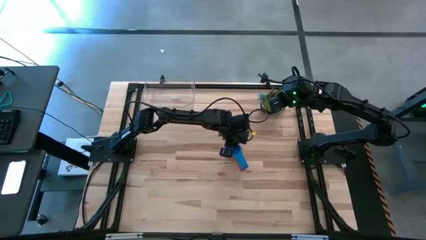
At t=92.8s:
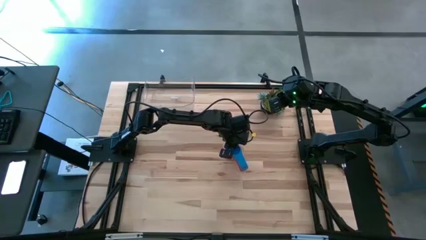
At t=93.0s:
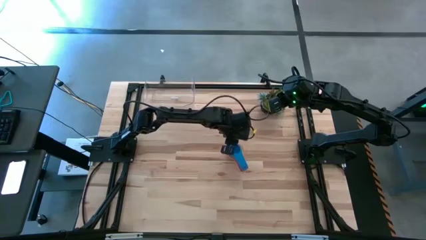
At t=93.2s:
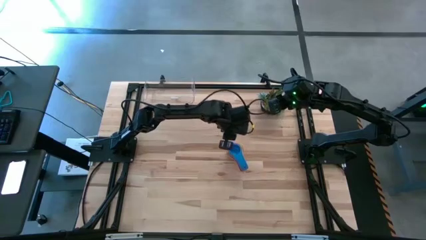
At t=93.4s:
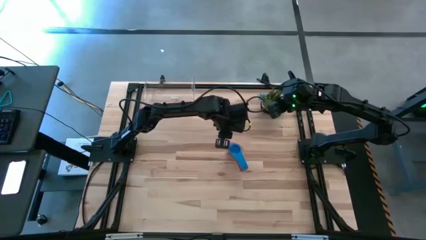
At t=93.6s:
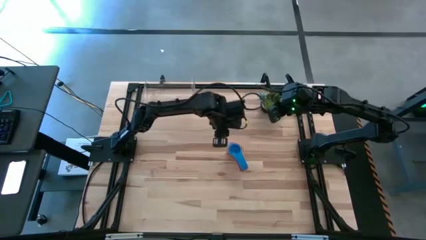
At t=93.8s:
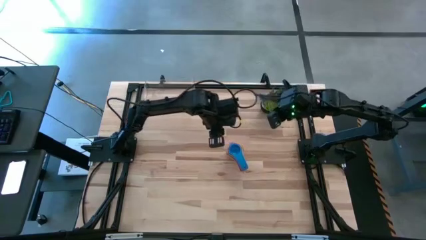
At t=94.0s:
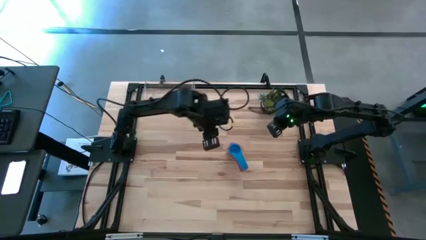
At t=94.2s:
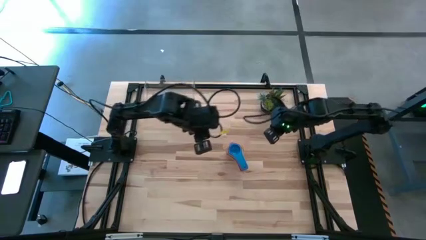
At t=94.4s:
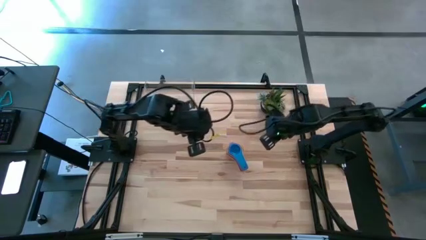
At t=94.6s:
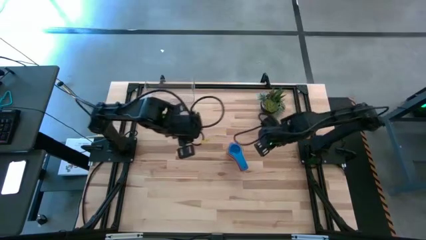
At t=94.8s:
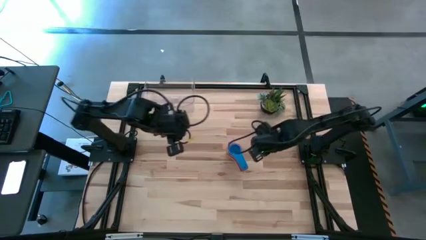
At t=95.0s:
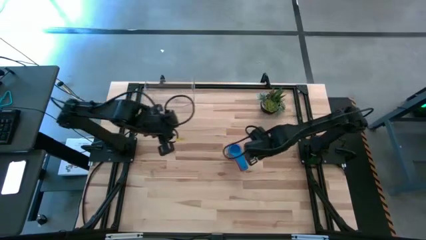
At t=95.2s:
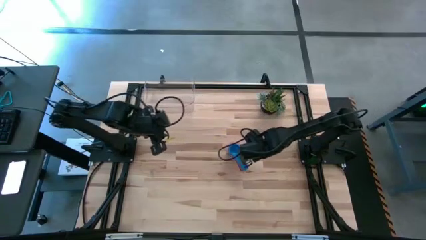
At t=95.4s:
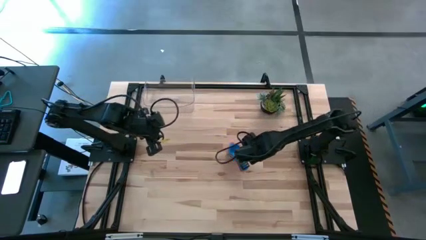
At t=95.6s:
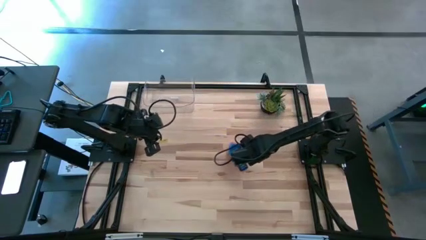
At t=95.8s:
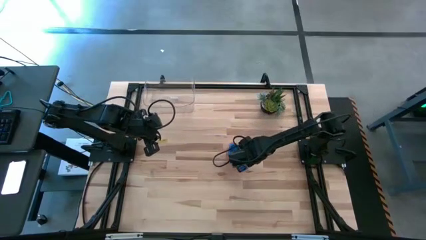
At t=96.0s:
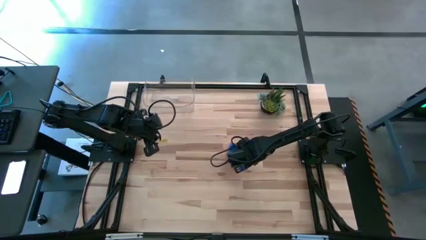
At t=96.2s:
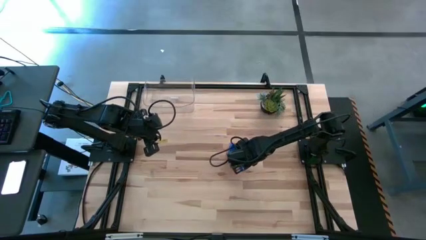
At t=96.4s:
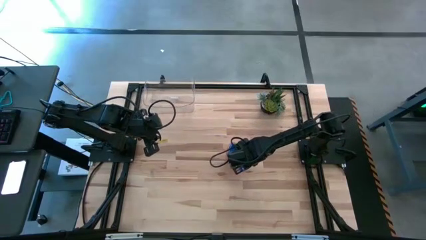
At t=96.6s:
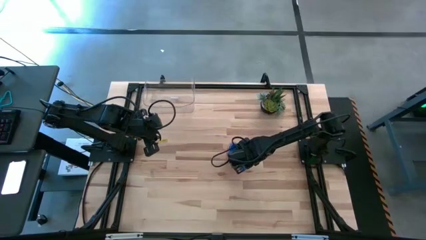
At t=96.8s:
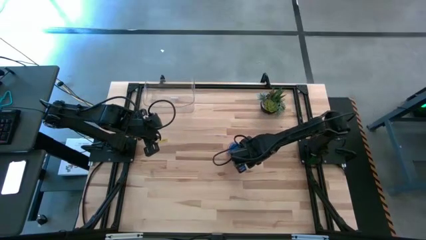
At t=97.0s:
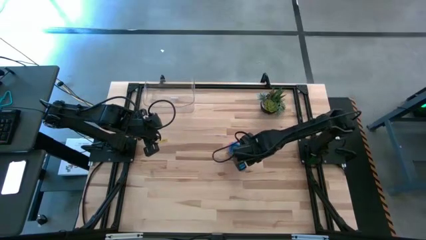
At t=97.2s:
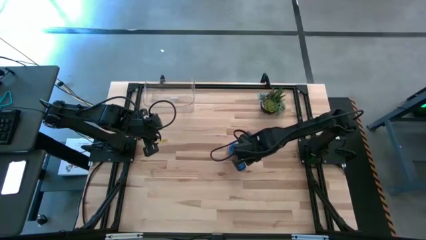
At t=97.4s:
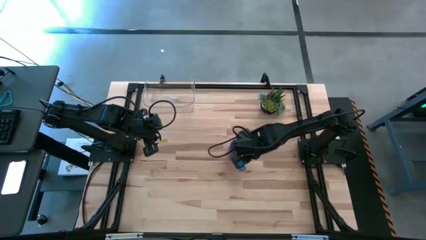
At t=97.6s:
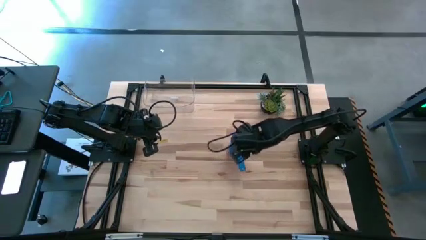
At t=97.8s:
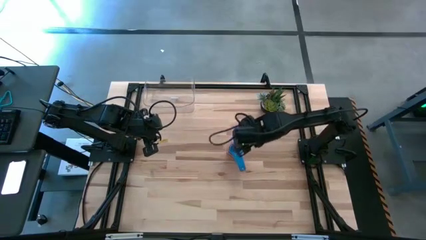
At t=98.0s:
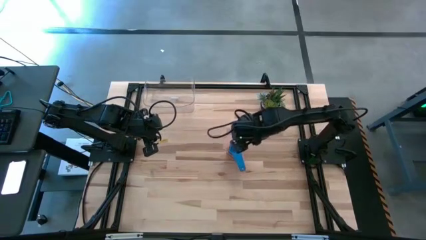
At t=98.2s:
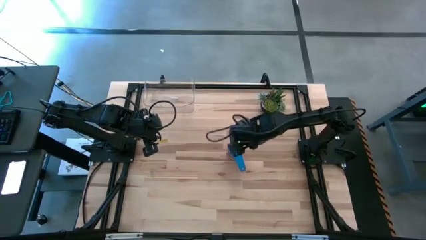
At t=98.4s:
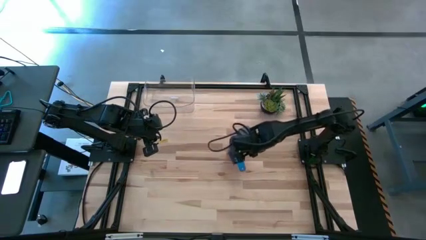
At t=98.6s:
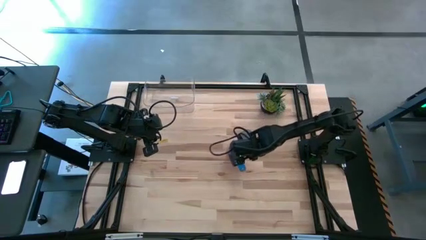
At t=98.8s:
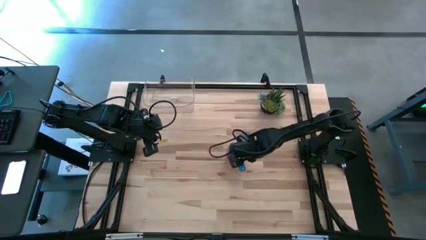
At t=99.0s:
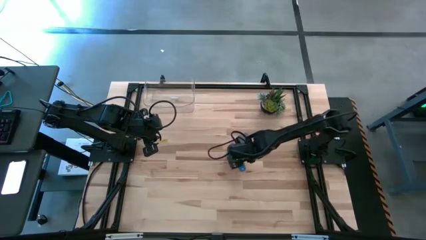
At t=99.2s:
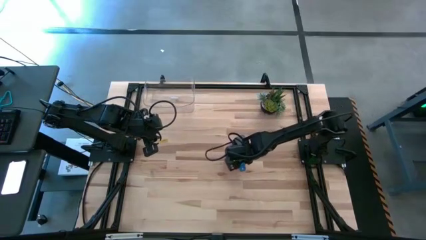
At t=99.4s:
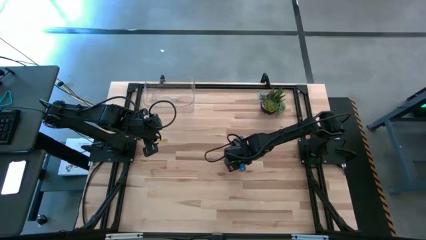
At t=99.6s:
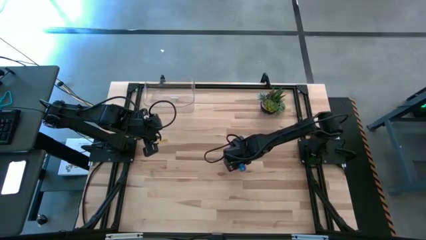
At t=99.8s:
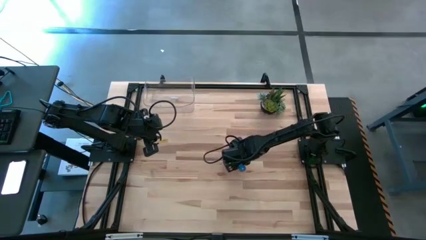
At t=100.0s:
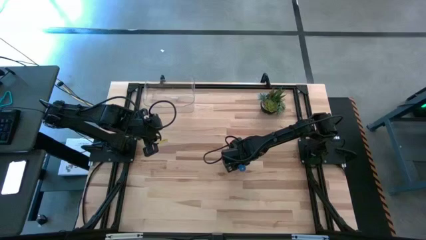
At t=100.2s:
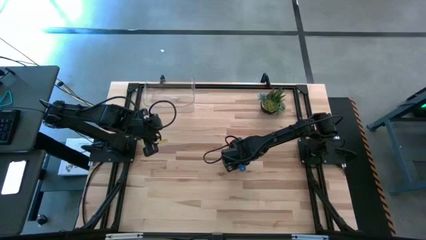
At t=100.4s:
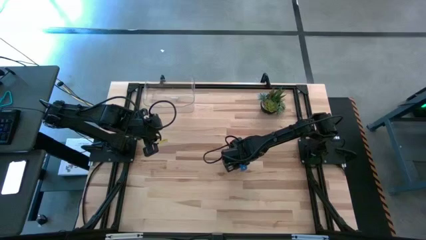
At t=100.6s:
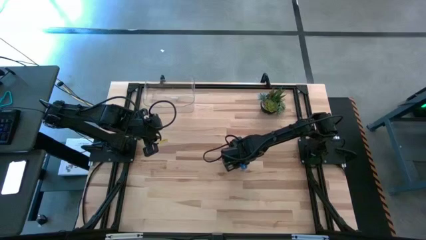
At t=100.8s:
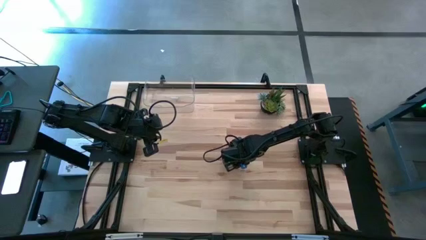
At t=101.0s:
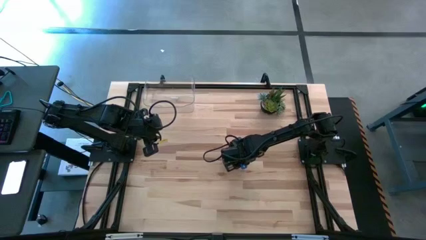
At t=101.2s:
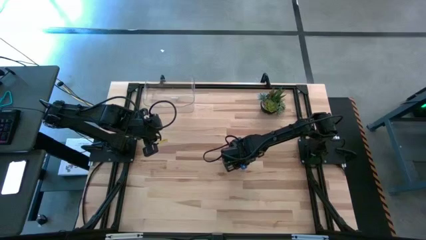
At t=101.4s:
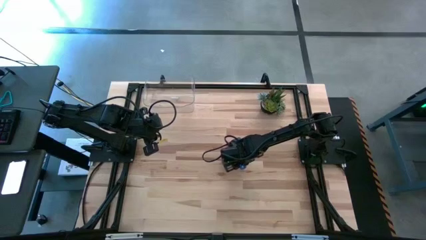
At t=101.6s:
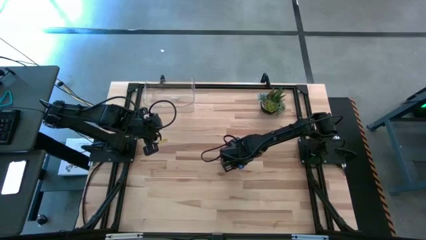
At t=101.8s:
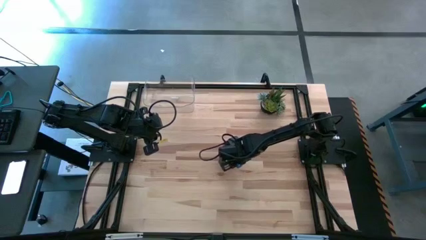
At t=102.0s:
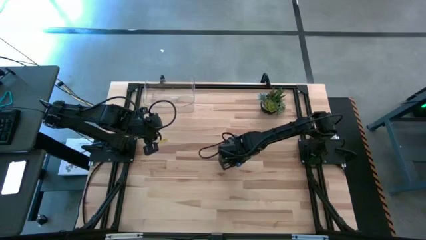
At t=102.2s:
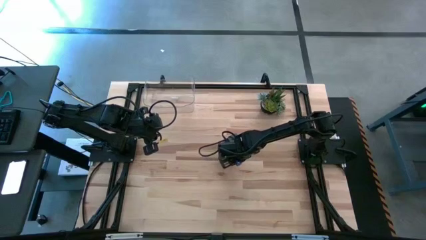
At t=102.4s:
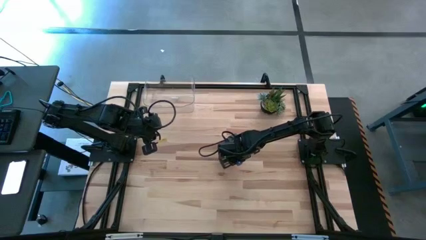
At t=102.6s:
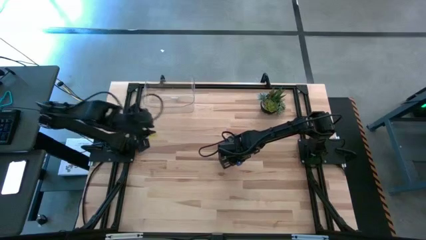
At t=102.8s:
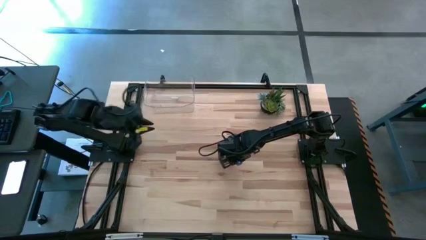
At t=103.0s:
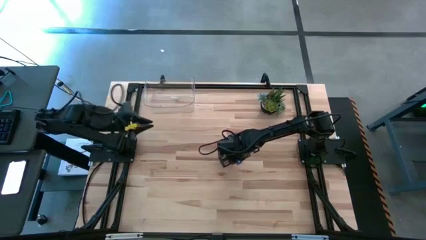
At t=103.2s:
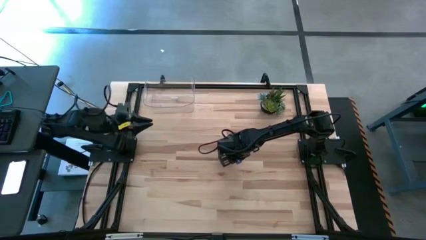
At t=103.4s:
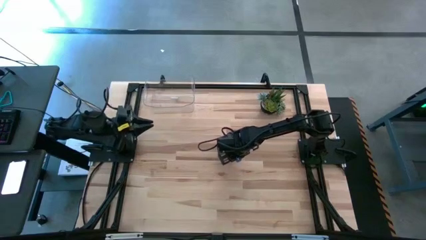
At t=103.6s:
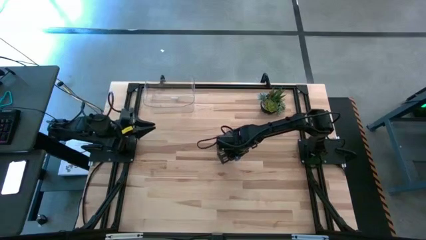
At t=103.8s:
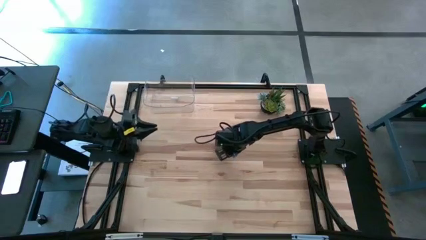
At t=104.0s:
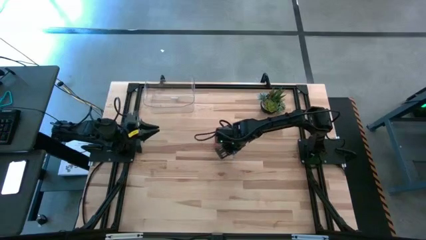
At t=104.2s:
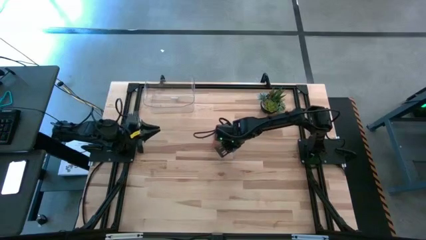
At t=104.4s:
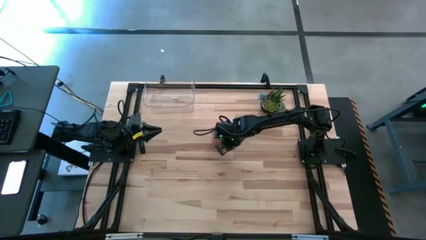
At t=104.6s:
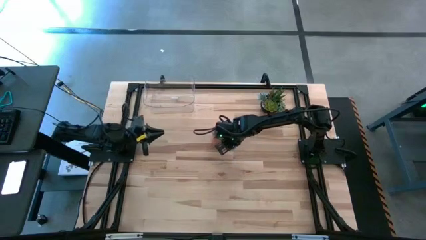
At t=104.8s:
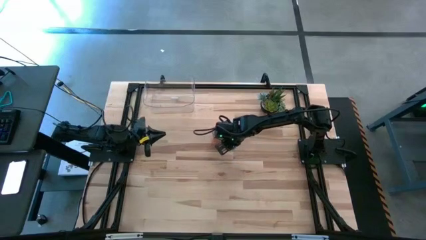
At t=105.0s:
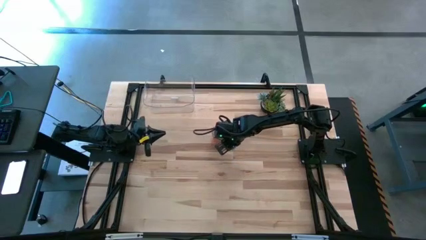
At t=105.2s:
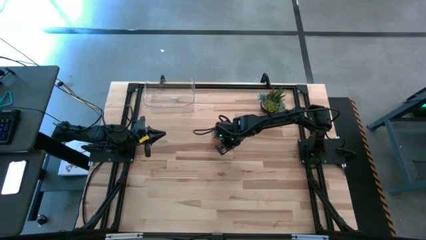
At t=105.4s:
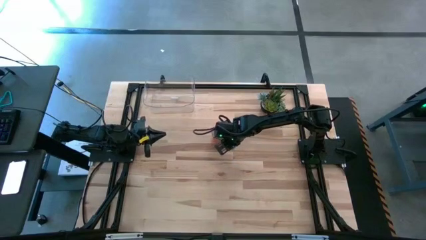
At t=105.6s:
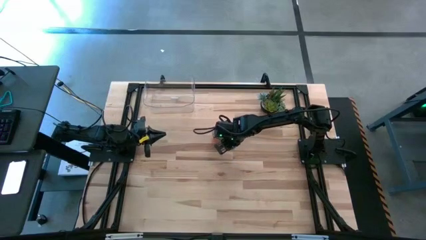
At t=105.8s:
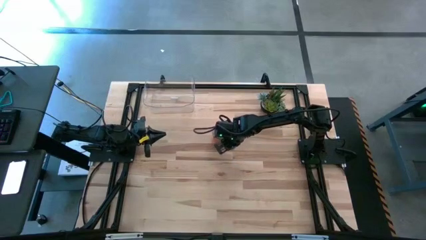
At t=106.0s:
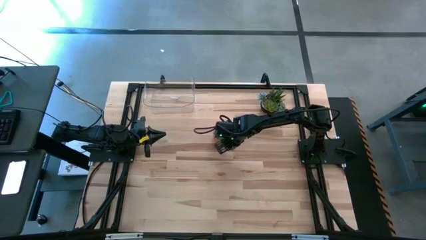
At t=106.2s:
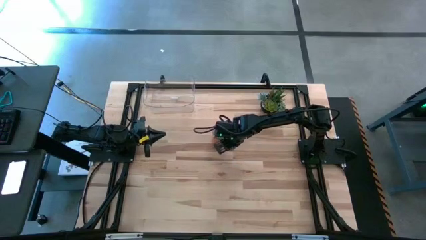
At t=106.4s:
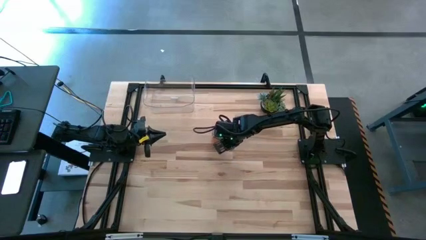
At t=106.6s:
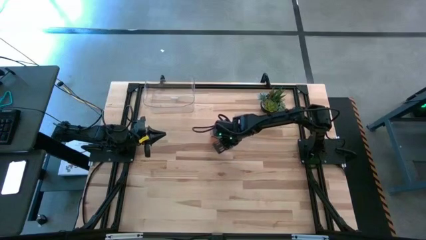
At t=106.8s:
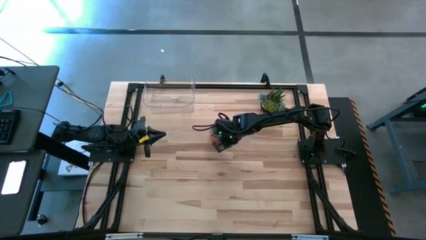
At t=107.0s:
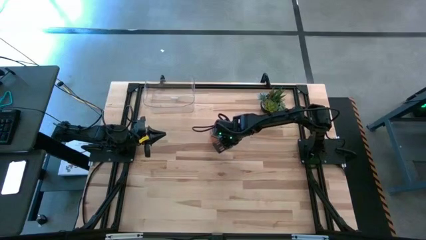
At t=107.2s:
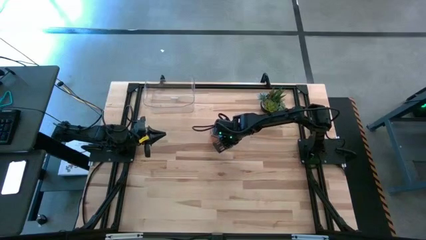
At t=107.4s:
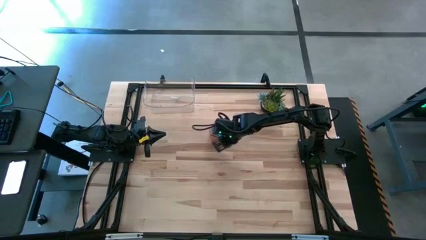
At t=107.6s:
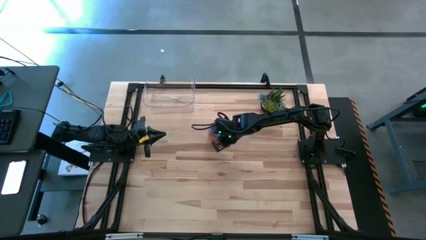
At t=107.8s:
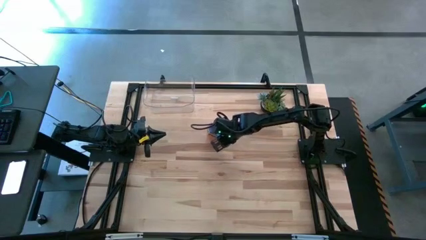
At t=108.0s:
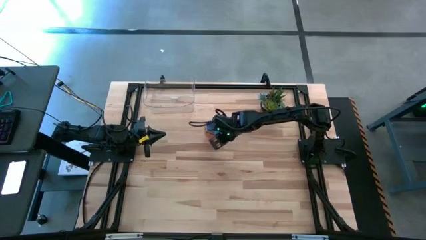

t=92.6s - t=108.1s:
Task: Nest measuring cups in basket
Put the stacked colored measuring cups into the transparent bin
